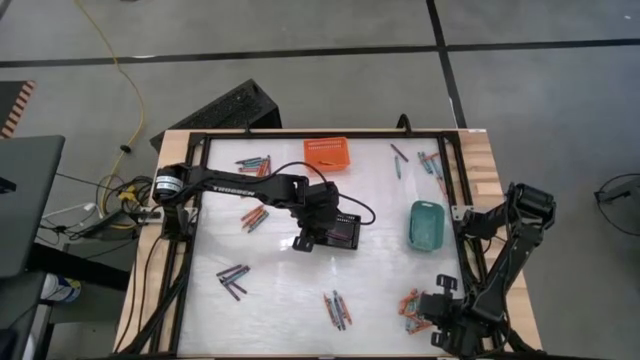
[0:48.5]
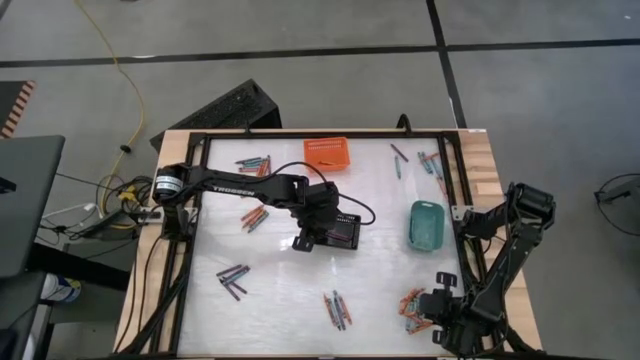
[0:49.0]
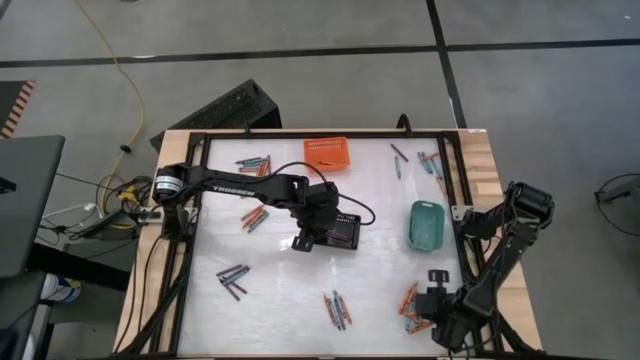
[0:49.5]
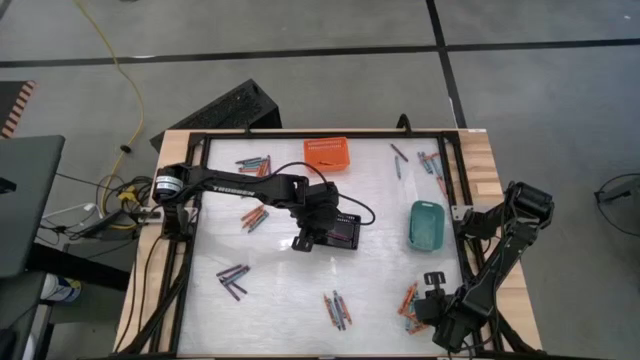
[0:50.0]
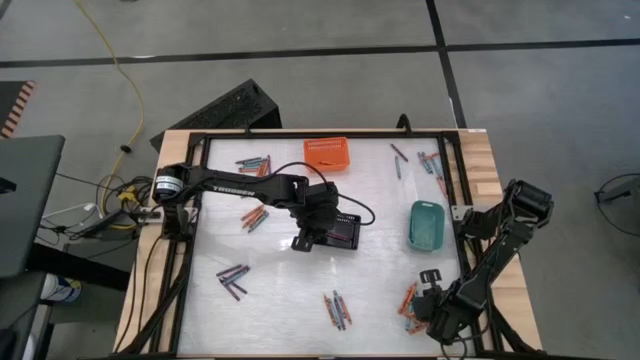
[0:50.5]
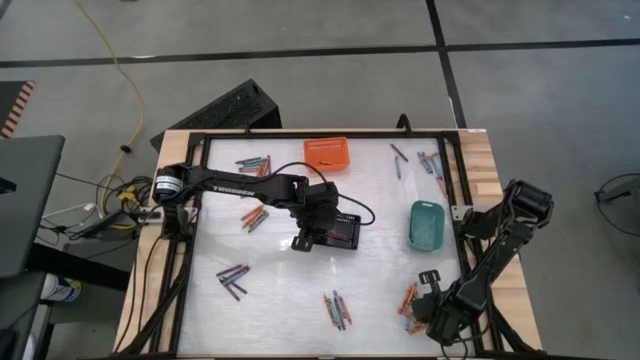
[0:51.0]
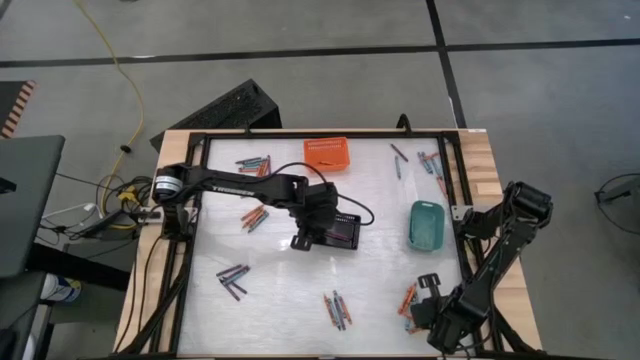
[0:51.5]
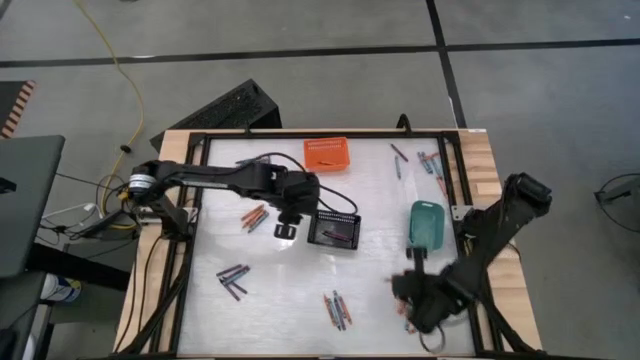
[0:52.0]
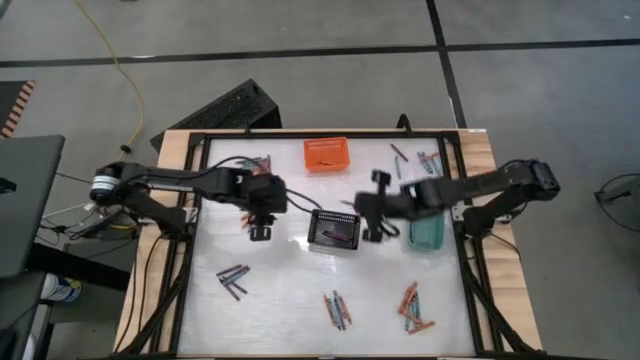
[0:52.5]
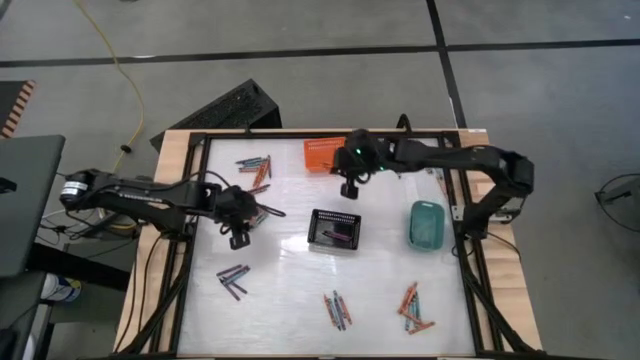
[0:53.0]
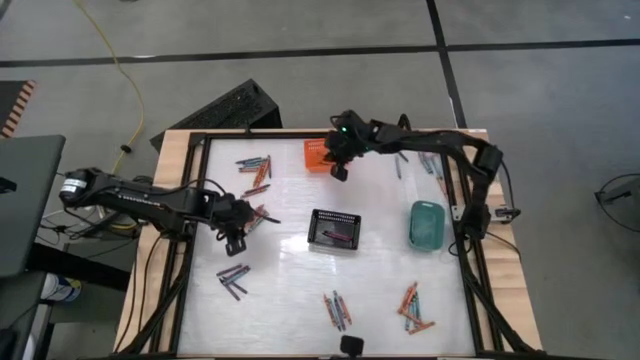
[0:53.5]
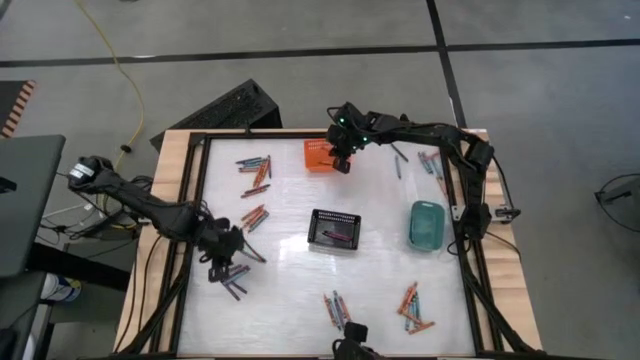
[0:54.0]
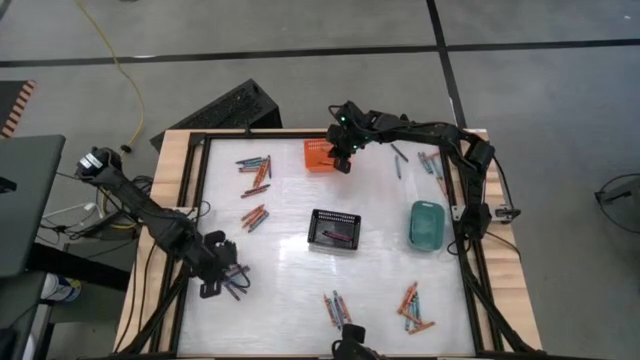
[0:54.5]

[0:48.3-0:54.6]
Task: Sort crayons
Put the orange crayon into the orange bin

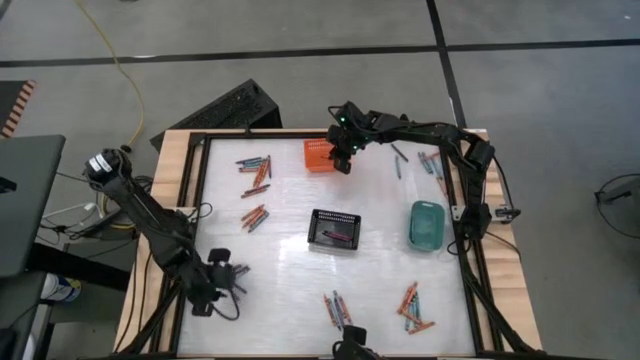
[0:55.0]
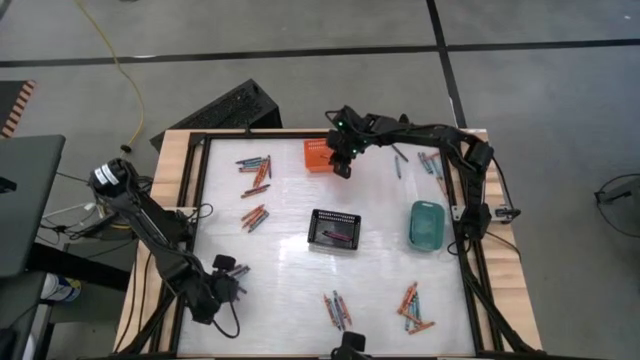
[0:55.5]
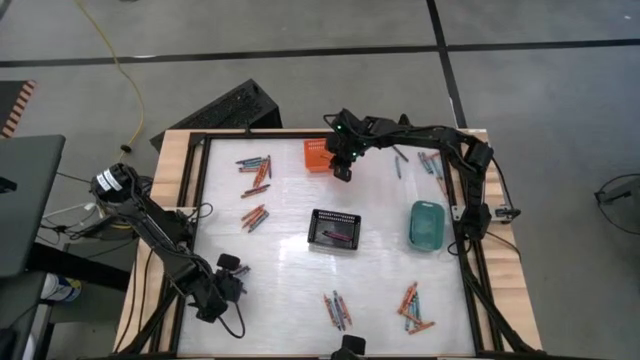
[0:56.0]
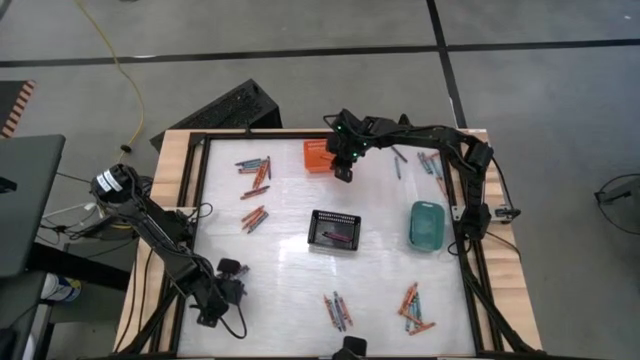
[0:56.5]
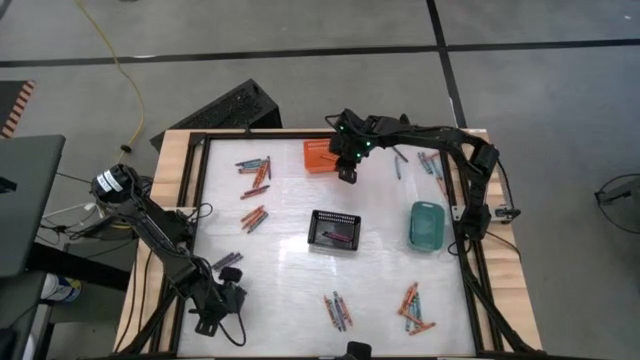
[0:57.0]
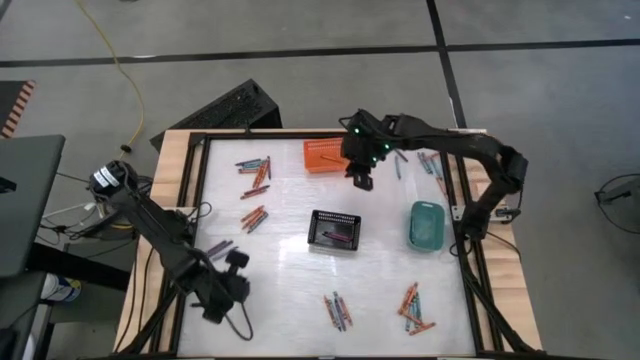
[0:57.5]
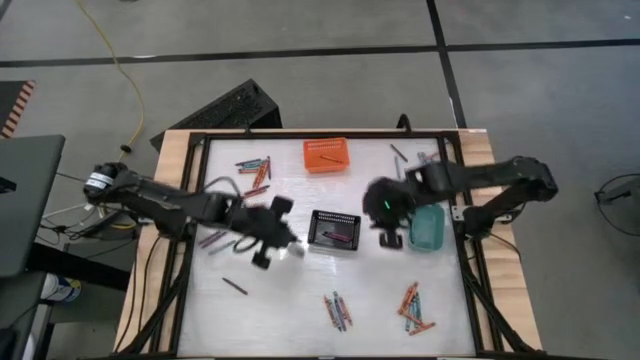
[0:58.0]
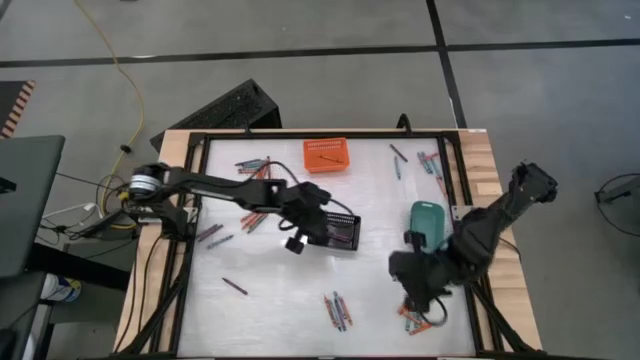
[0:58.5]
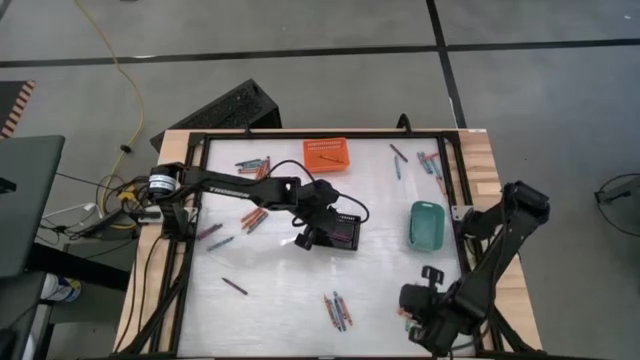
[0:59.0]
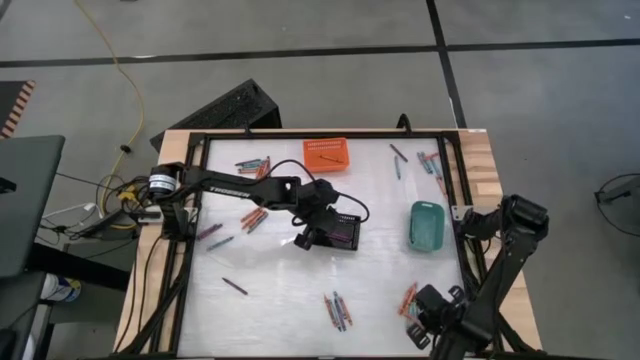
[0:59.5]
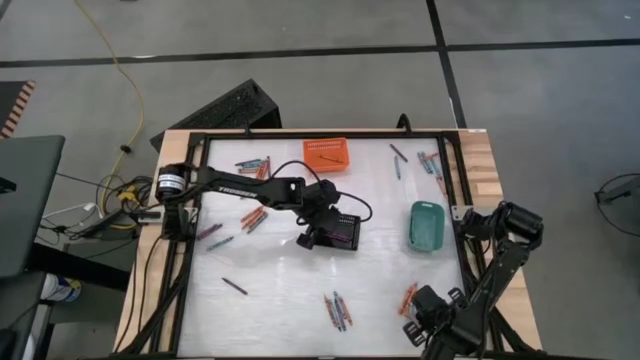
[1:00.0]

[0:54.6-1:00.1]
Put the violet crayon into the black bin

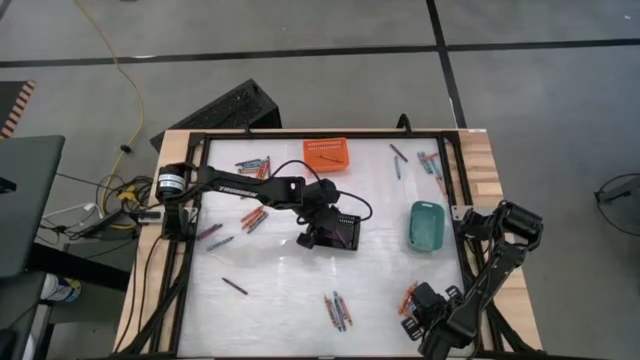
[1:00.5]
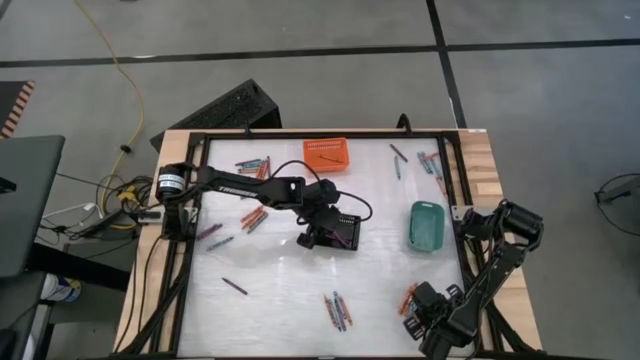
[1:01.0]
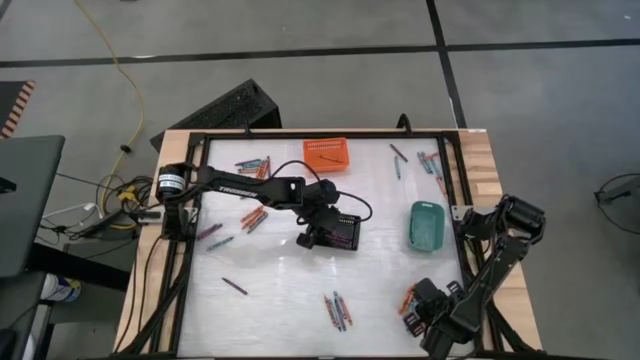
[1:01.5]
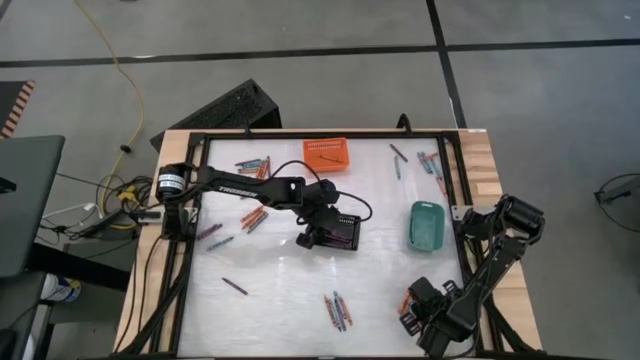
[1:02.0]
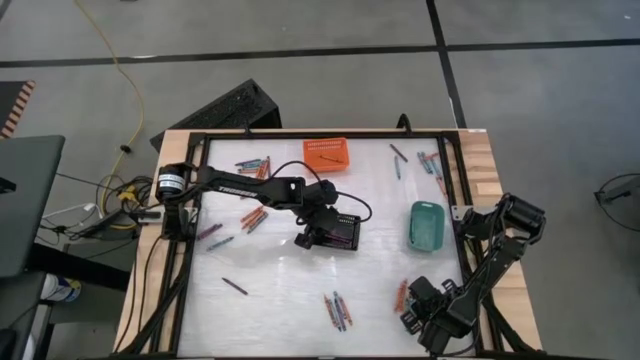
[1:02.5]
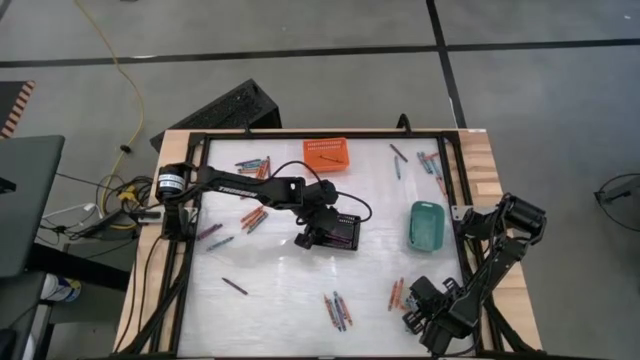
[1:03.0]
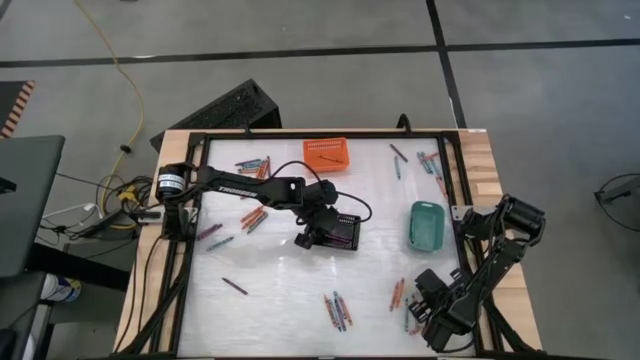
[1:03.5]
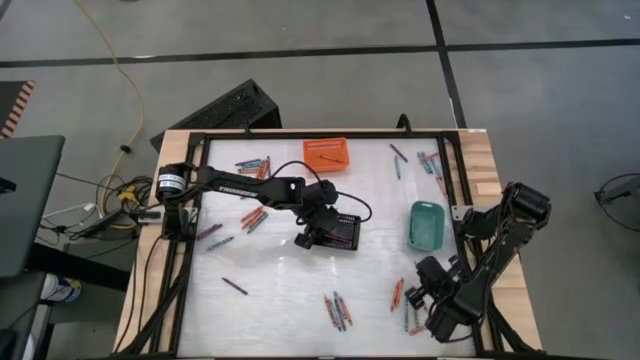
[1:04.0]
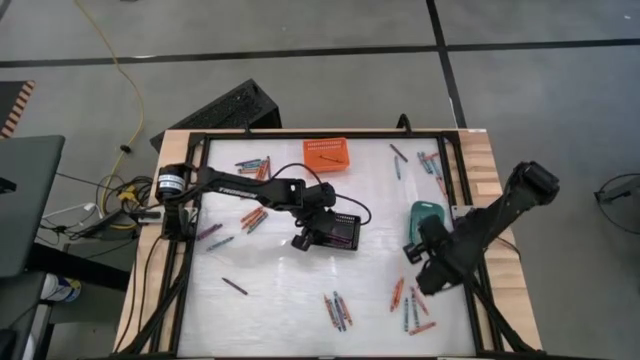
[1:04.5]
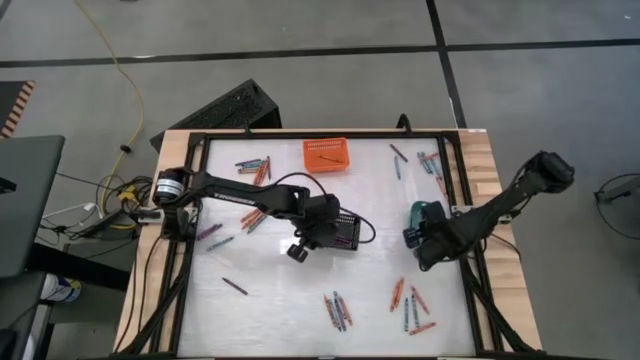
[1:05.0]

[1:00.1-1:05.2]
Put the light blue green crayon into the green bin

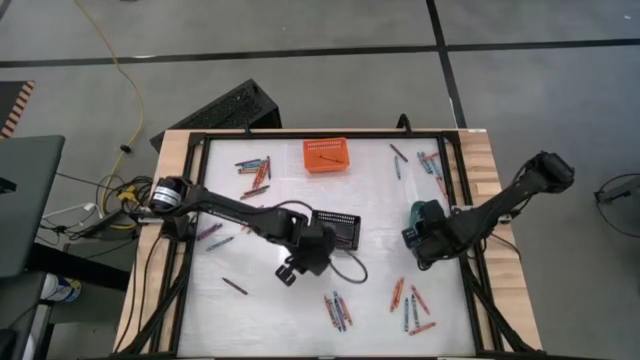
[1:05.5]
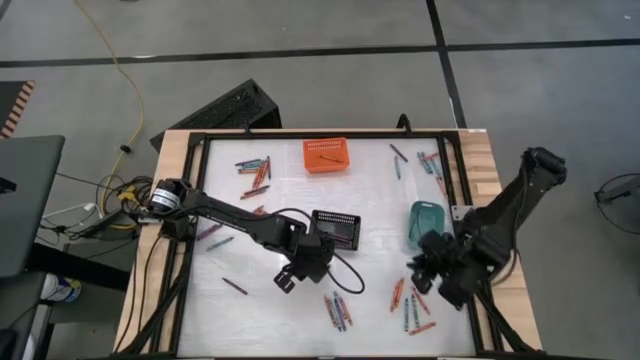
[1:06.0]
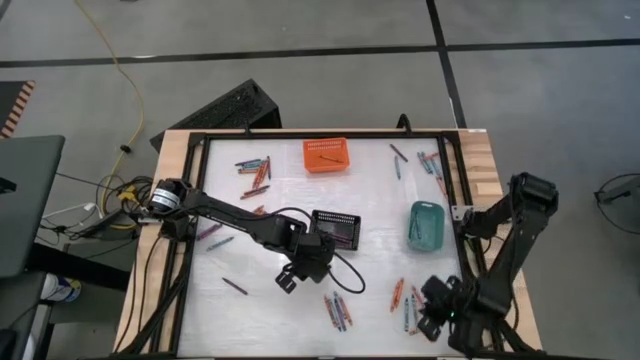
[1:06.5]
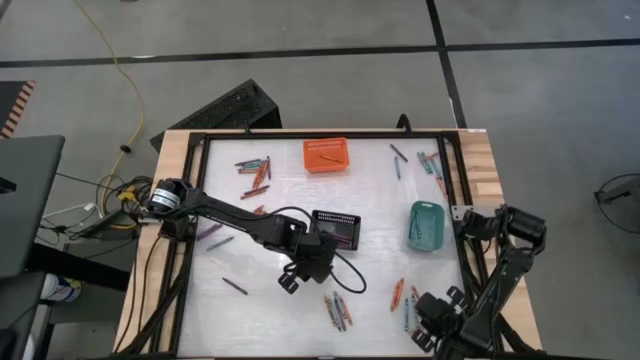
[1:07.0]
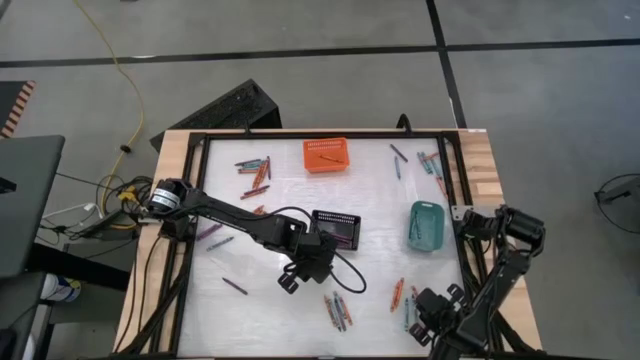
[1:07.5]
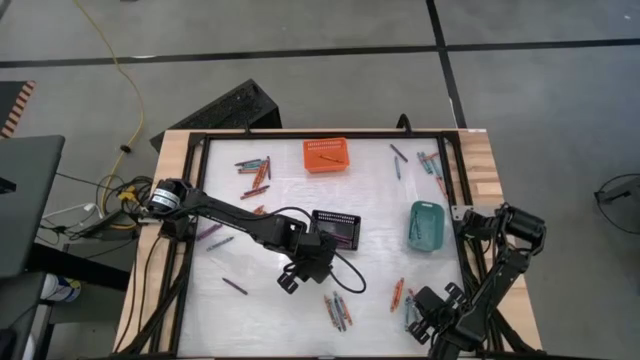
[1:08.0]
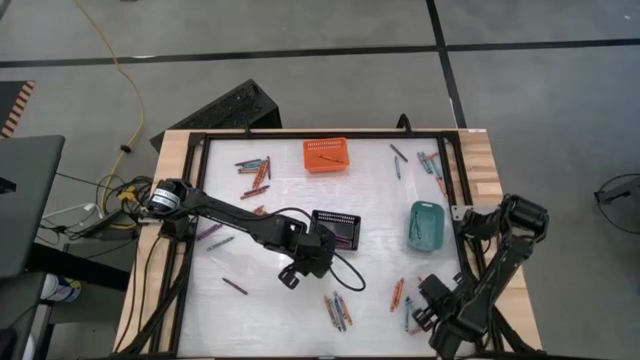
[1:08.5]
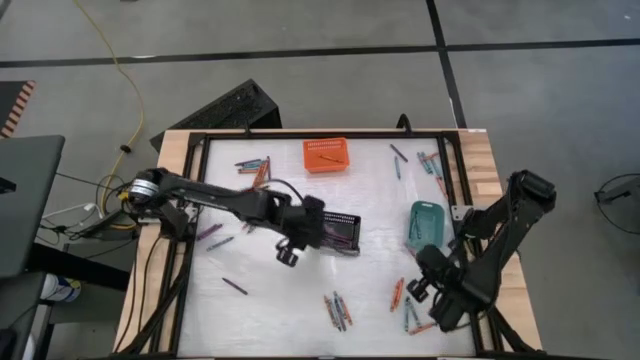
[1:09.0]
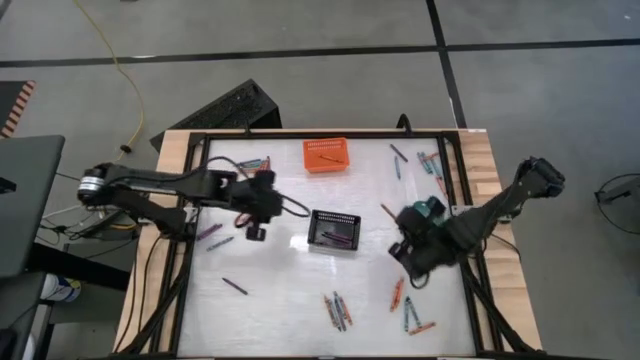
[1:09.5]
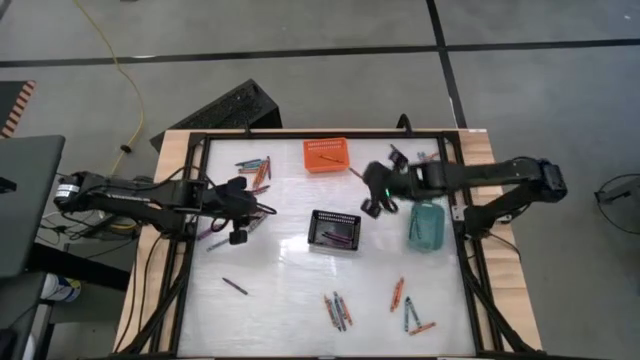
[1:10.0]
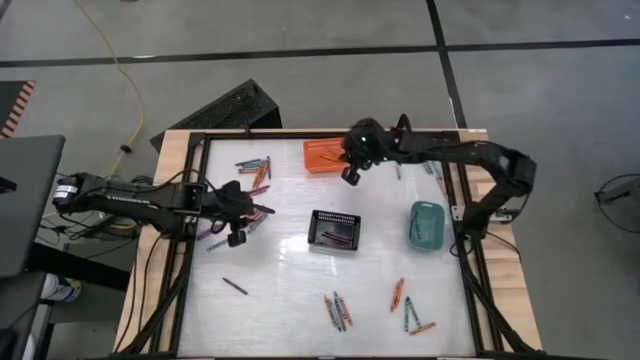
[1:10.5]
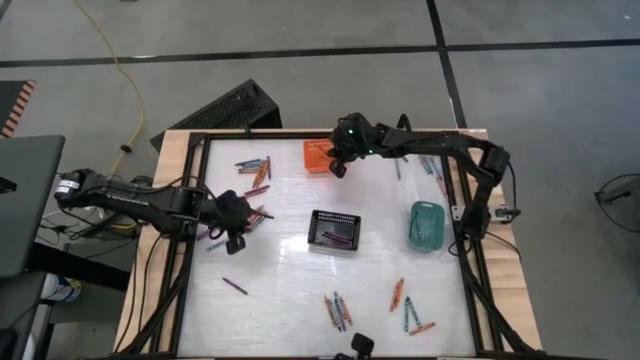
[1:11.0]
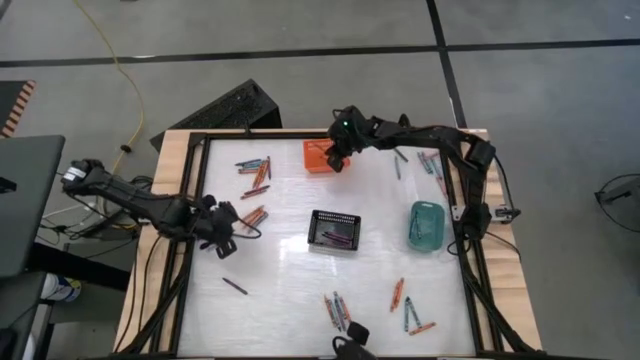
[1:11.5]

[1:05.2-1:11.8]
Put the orange crayon into the orange bin
